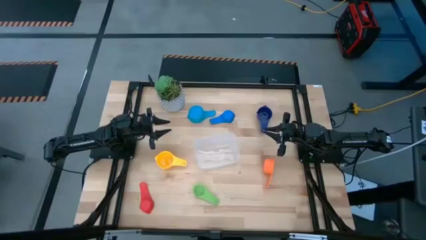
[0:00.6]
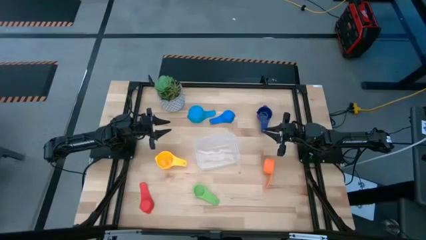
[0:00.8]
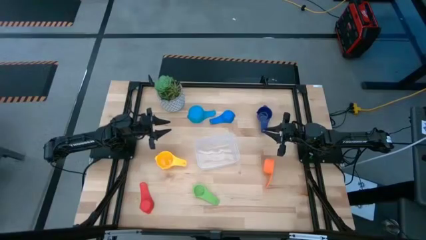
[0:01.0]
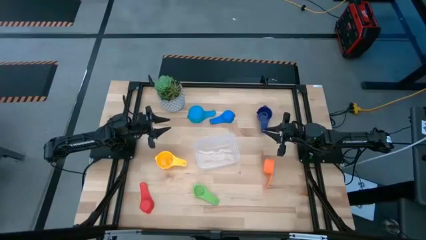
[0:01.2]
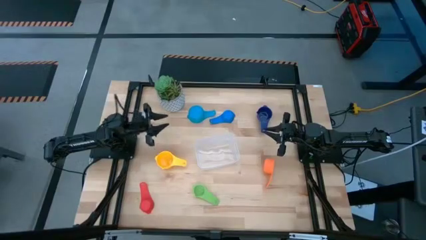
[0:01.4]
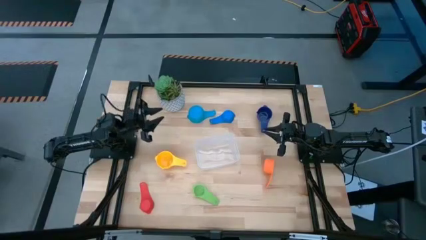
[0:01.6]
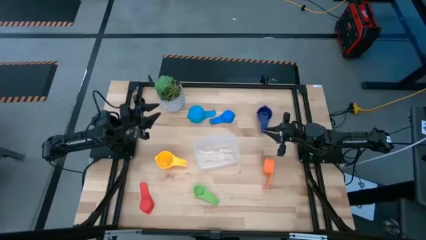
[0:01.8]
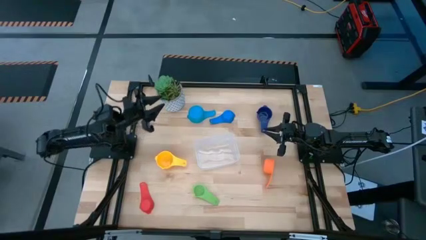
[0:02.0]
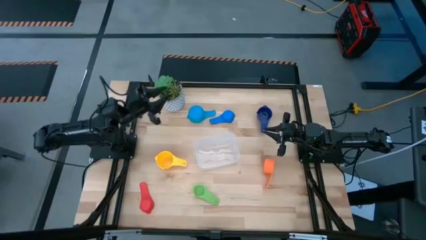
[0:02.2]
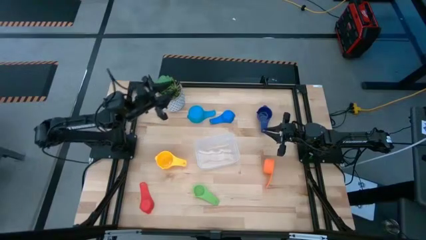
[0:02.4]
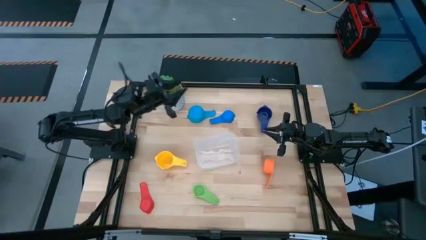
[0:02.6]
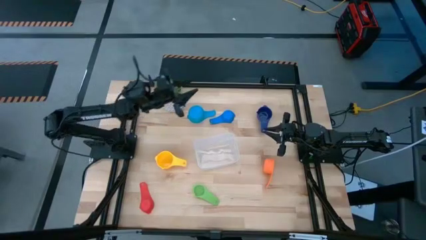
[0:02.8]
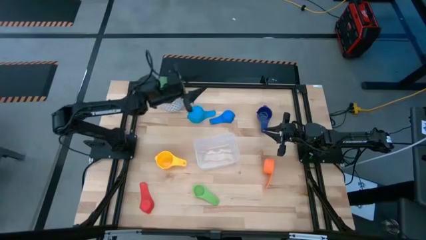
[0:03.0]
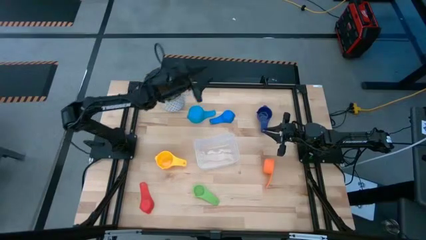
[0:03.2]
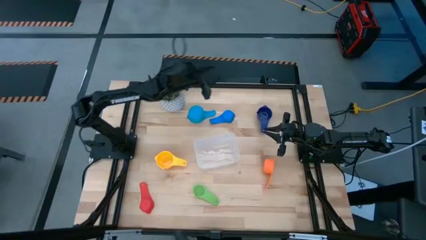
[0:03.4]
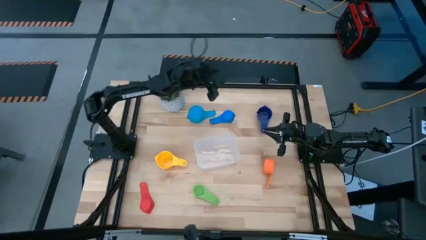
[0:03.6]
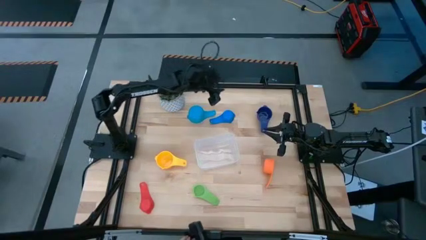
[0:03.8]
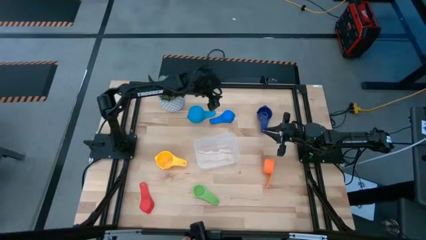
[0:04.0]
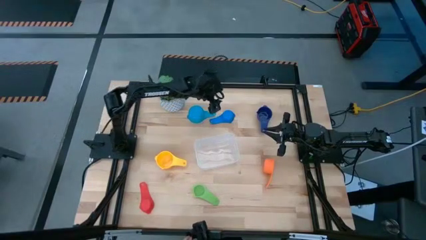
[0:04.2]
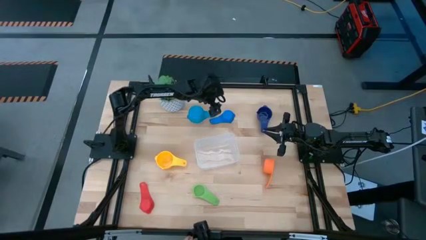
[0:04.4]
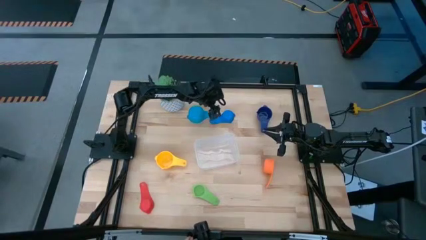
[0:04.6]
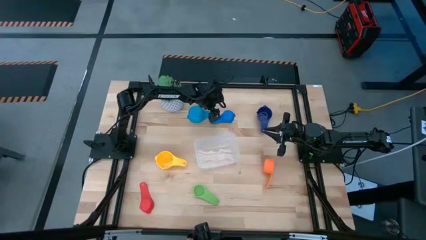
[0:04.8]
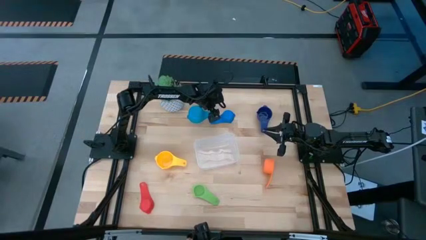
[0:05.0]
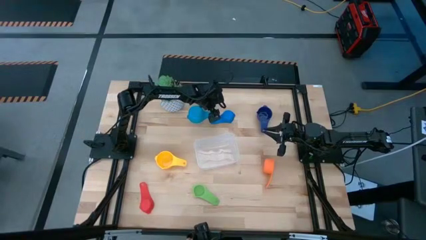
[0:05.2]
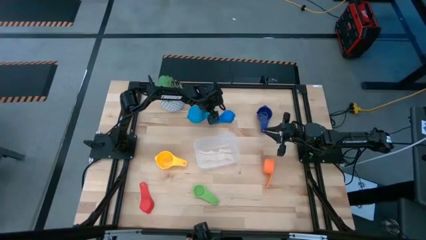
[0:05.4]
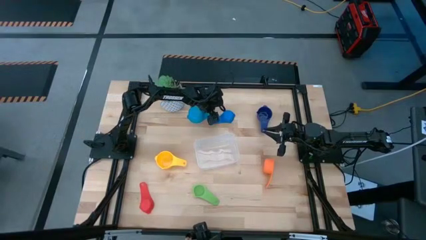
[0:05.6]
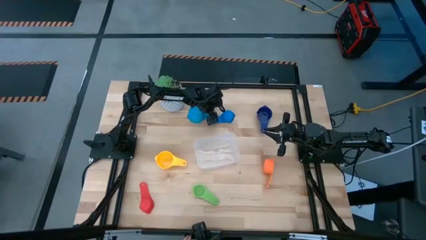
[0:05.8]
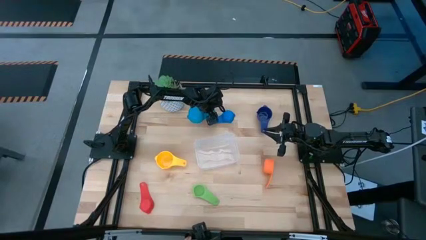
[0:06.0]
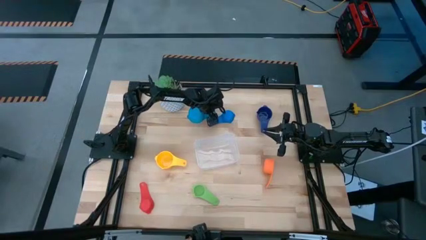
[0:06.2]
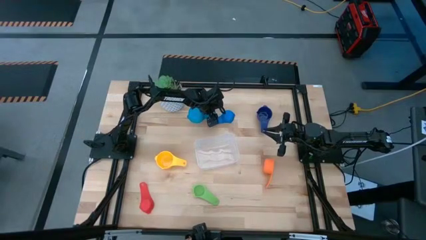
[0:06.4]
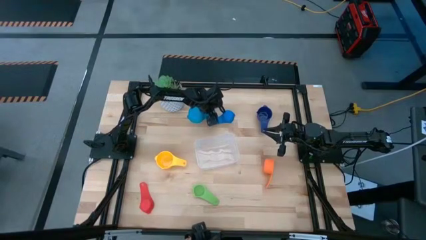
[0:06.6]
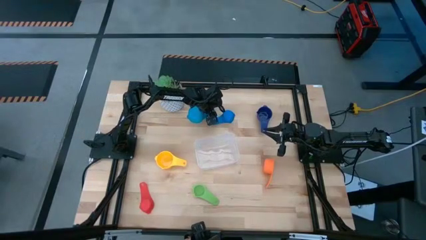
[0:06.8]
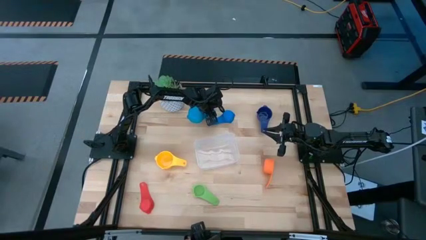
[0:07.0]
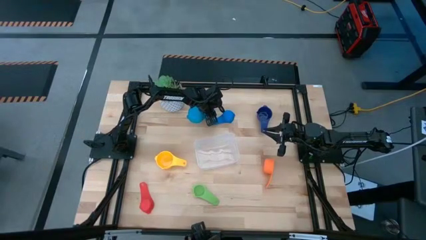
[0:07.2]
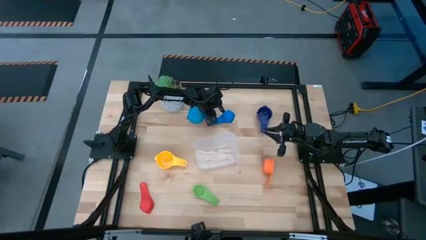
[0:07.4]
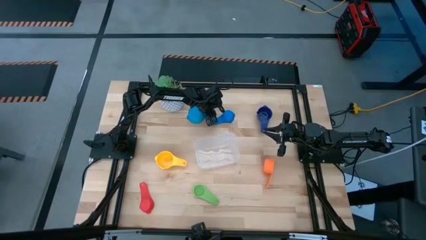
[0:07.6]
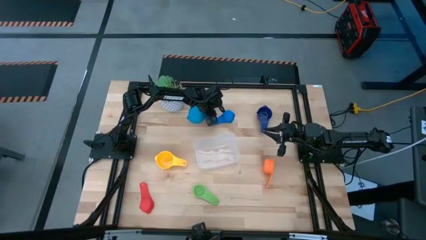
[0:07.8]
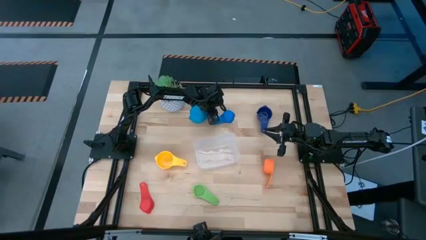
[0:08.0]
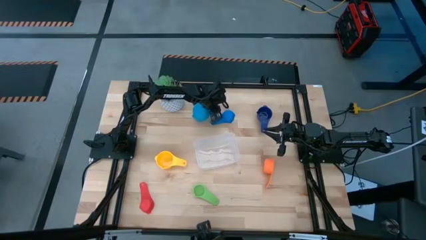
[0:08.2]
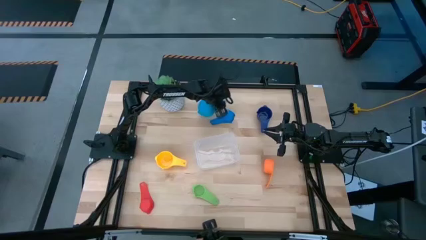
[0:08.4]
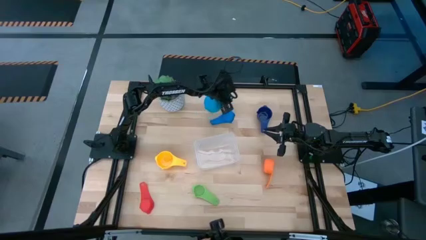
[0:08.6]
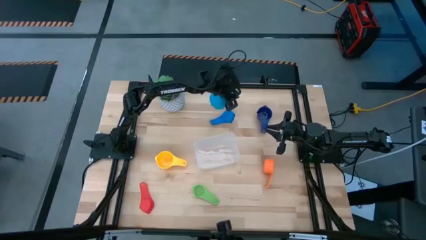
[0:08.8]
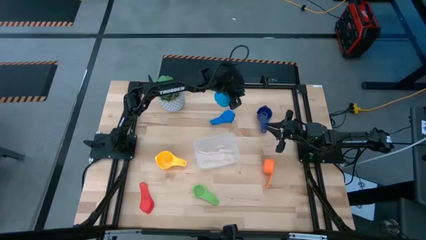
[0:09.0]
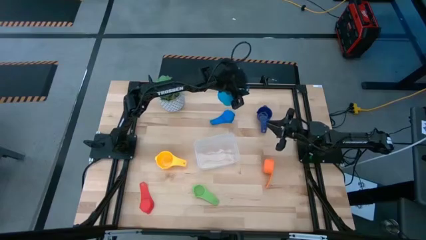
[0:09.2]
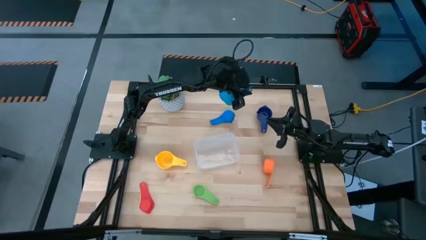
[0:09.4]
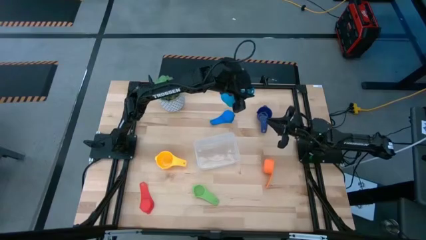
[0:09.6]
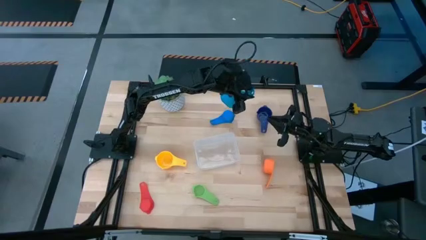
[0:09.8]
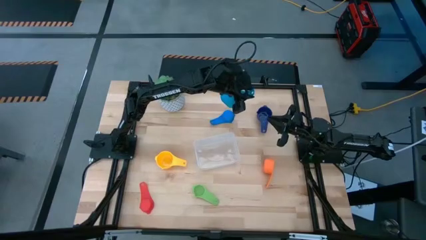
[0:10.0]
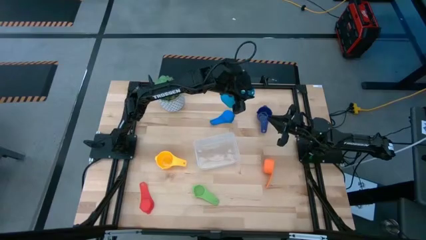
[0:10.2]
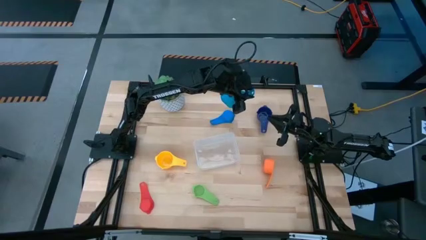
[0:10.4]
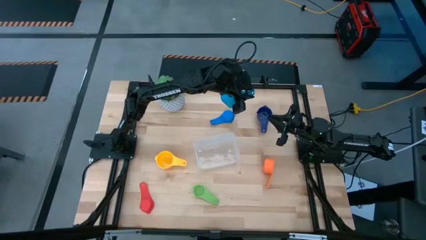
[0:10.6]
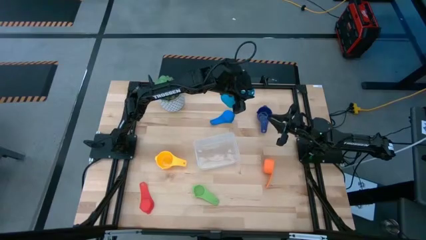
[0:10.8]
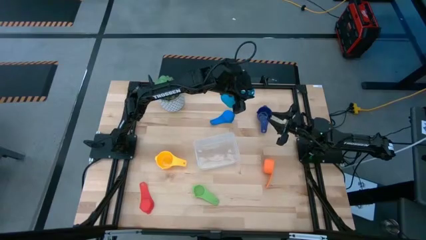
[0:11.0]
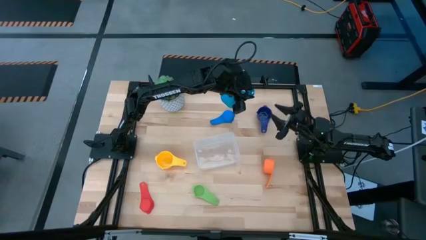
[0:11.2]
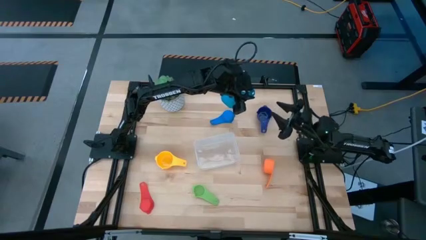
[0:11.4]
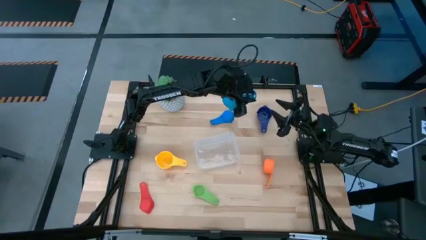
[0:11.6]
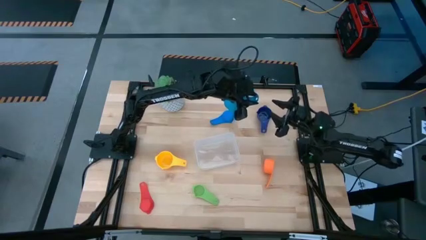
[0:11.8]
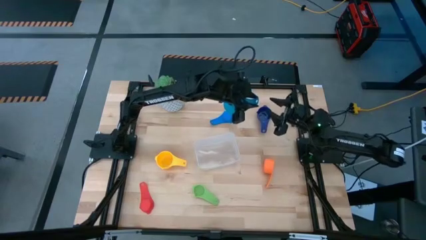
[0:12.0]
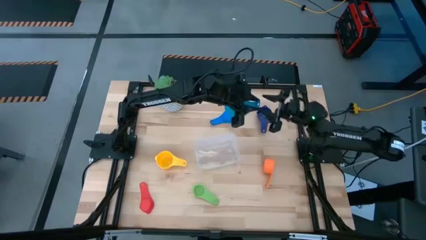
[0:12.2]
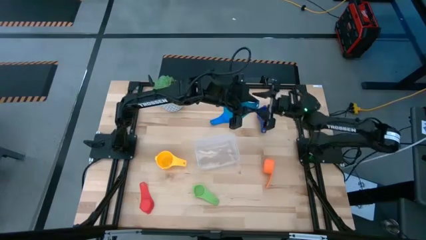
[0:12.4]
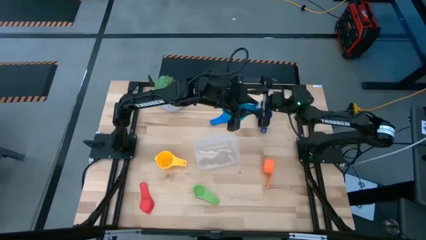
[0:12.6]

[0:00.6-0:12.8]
Task: Nest measuring cups in basket
Prepare the light blue measuring cup
